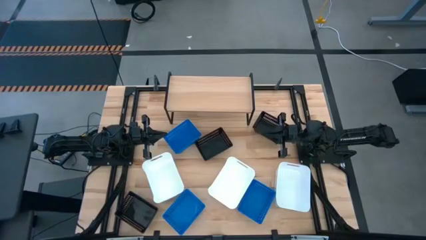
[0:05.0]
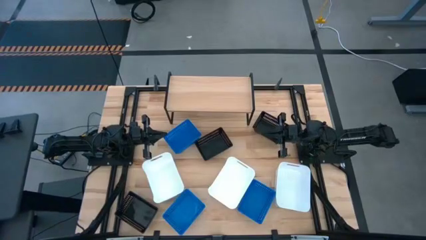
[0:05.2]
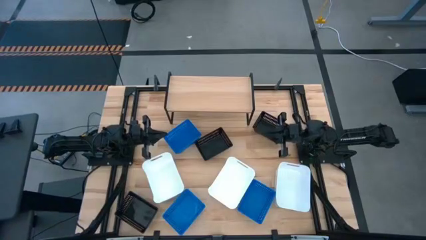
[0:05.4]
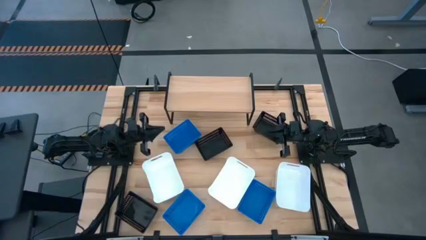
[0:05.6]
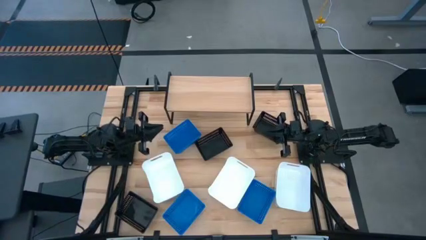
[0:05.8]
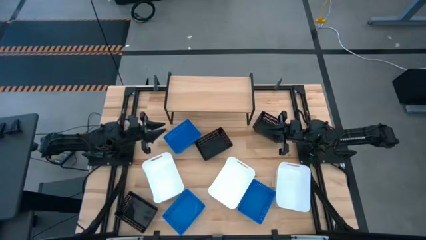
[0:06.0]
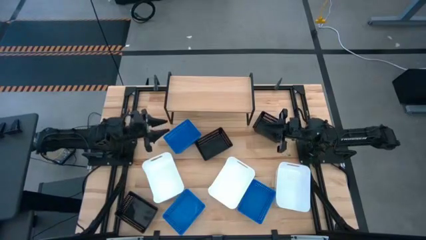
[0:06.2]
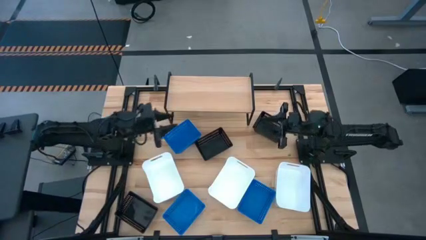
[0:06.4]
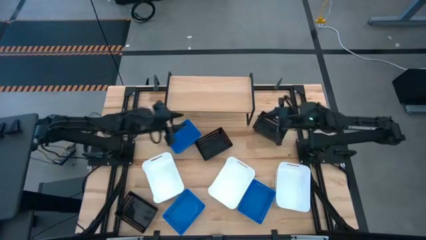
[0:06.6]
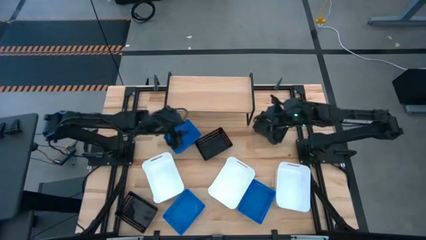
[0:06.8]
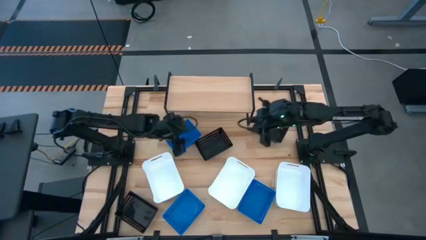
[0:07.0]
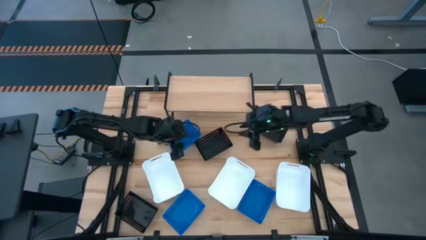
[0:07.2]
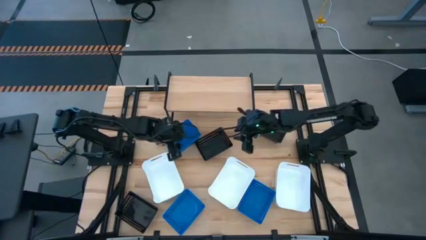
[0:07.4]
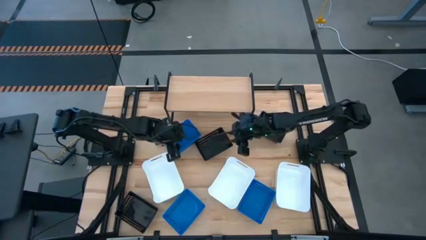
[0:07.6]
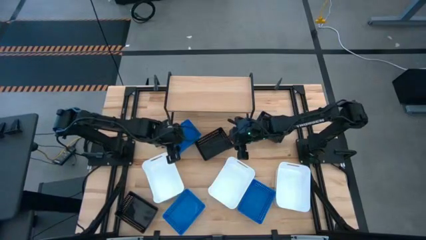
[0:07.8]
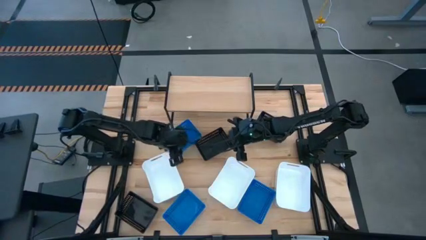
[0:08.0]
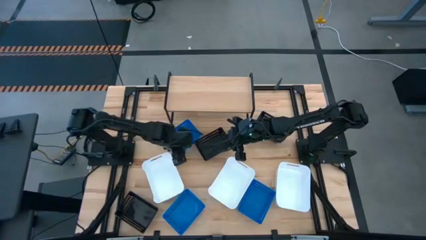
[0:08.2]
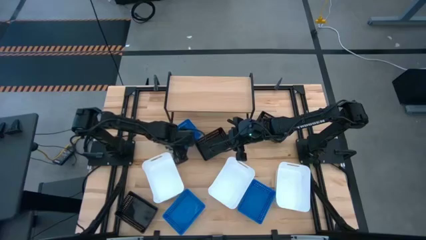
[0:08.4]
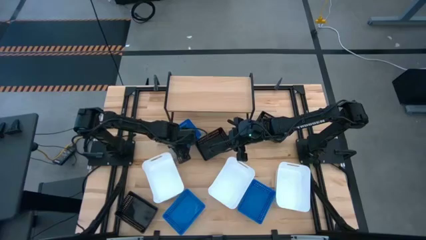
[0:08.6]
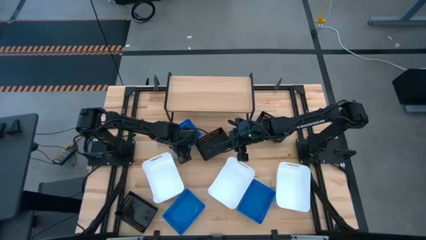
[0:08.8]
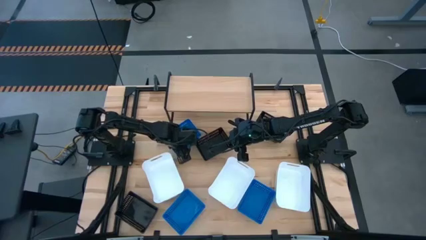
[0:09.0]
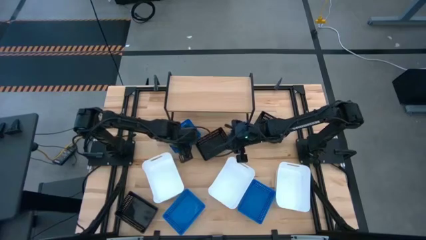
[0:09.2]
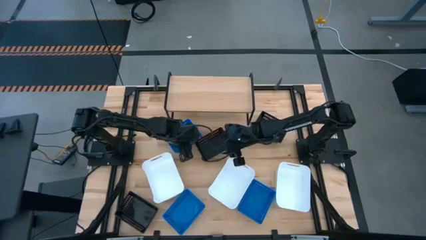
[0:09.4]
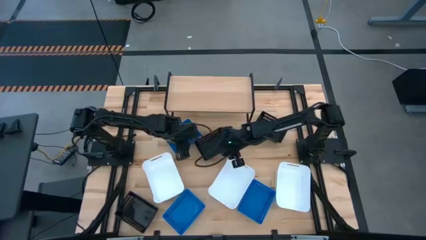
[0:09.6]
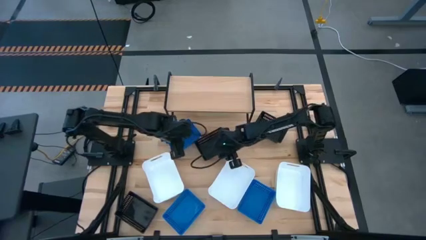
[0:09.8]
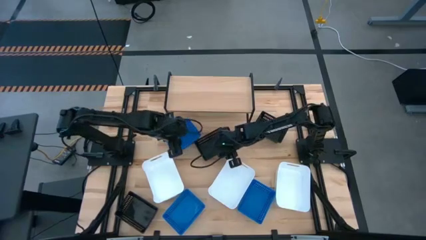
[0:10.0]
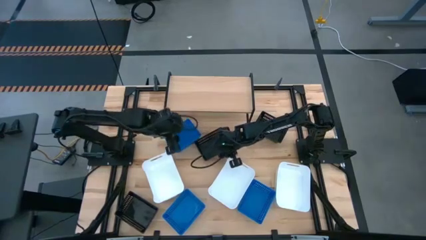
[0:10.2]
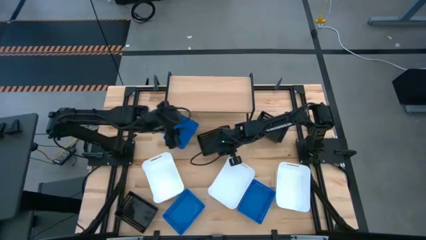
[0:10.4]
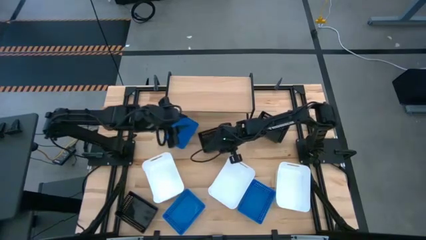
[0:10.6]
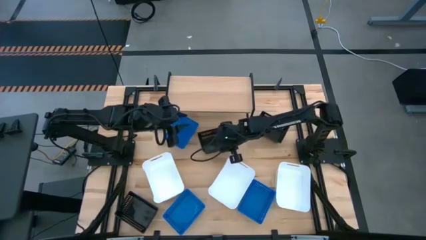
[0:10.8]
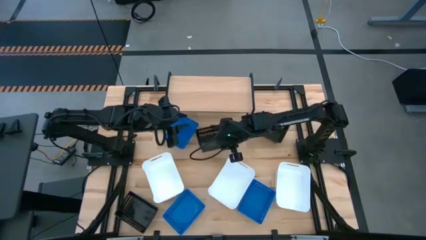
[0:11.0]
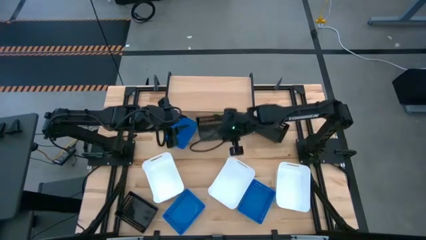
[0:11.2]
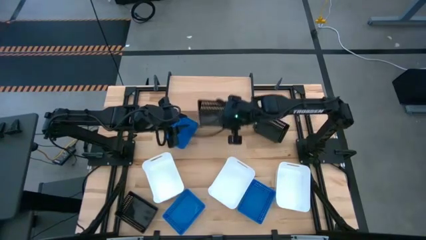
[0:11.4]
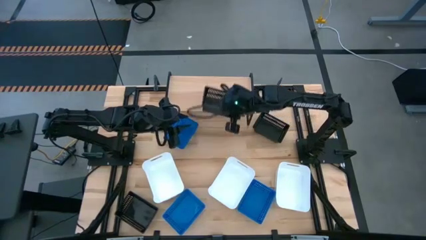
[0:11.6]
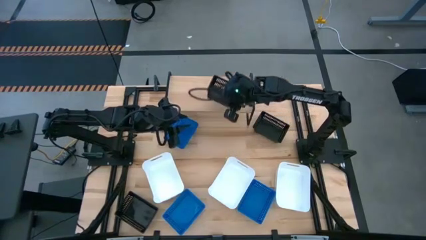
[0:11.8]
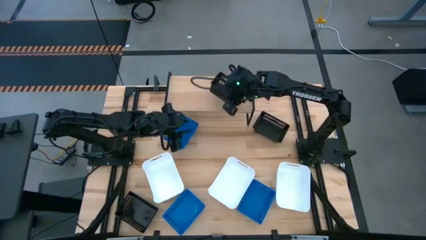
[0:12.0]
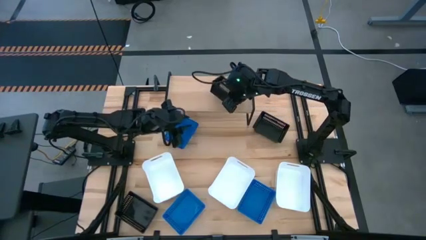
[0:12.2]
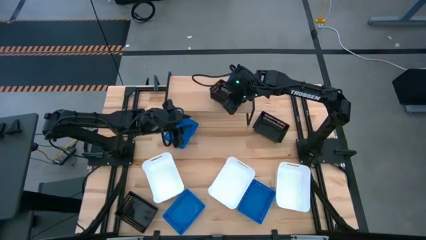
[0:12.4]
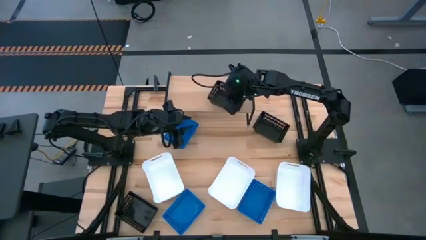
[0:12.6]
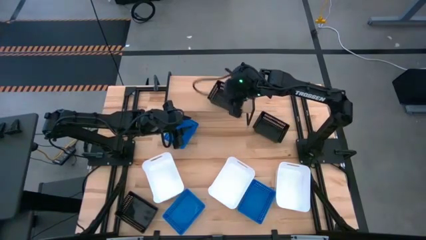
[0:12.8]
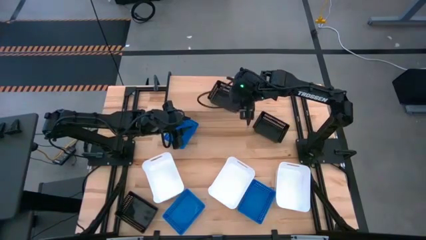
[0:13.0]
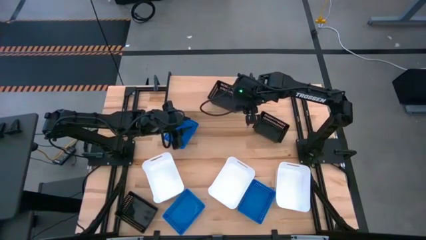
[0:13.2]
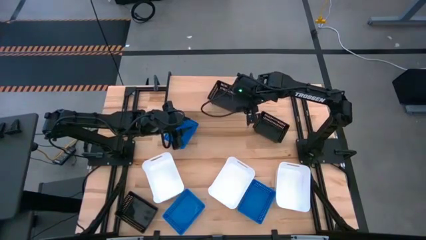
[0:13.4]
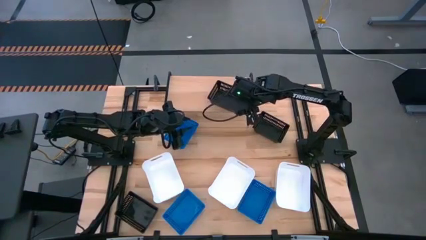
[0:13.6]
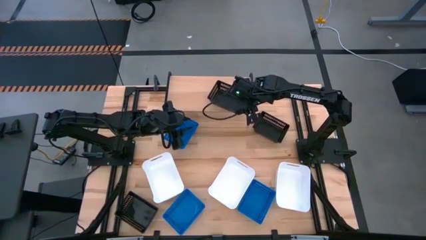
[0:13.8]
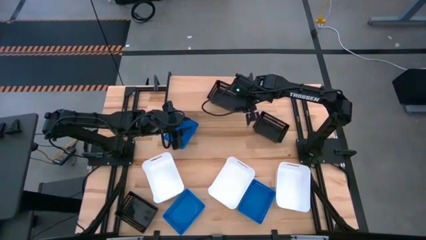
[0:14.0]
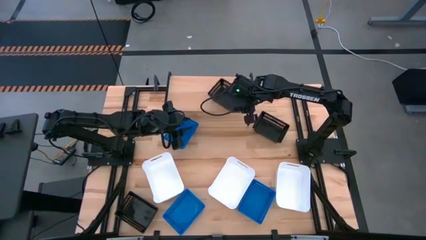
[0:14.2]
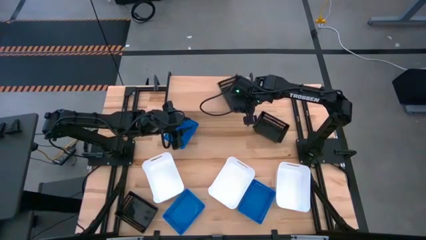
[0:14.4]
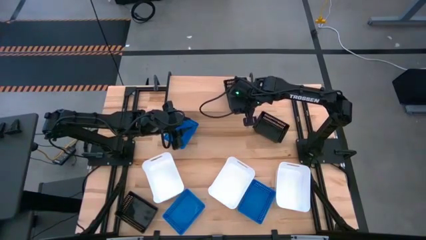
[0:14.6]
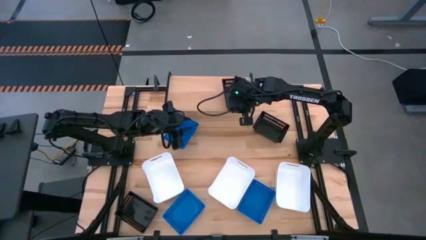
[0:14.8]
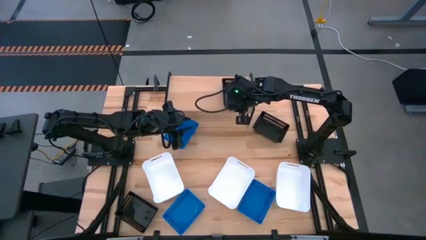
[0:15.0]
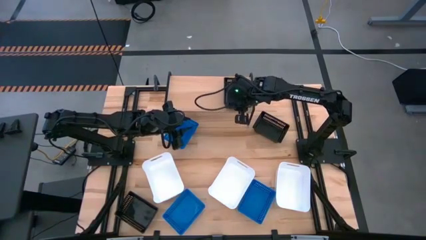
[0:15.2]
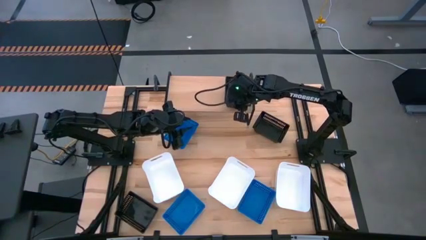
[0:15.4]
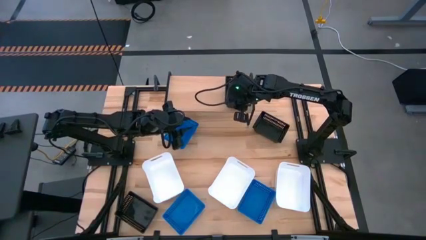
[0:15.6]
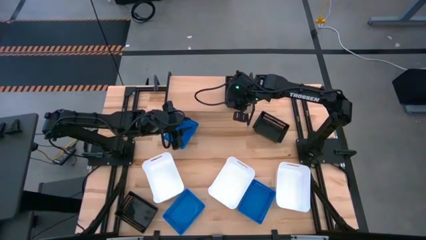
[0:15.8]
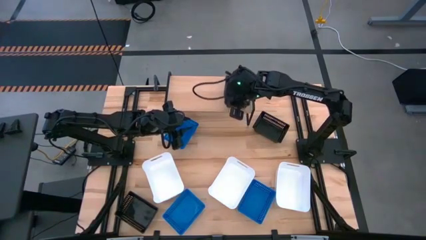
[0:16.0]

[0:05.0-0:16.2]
Task: Stack baskets on shelf by color
Put the top right black bin on the shelf

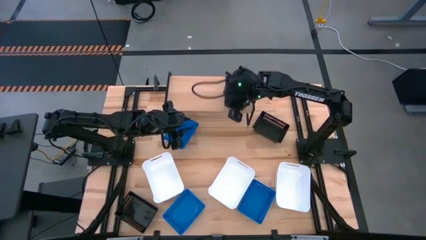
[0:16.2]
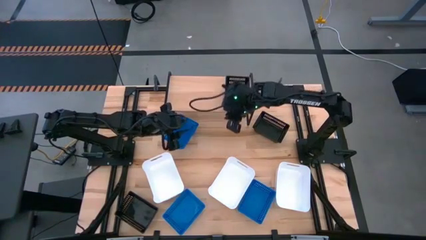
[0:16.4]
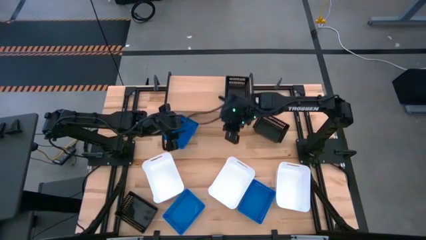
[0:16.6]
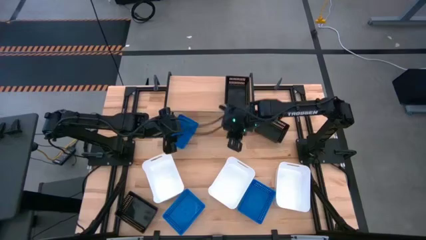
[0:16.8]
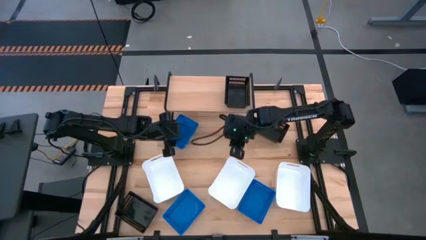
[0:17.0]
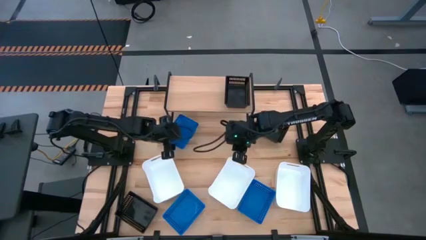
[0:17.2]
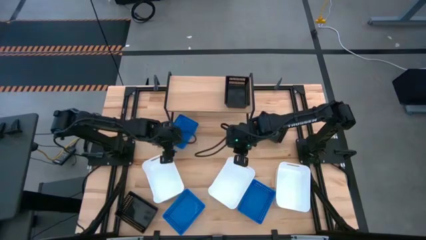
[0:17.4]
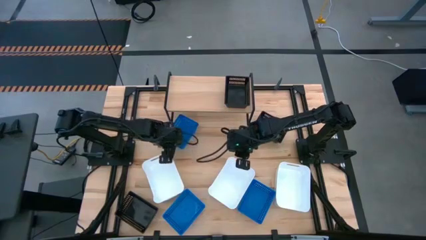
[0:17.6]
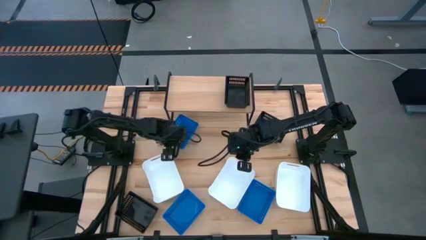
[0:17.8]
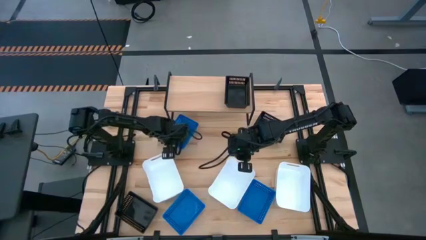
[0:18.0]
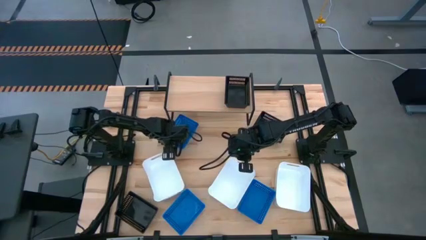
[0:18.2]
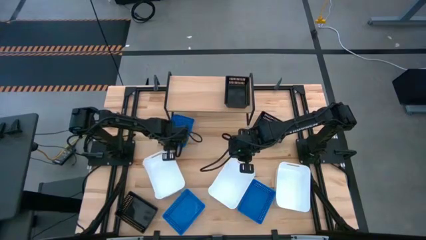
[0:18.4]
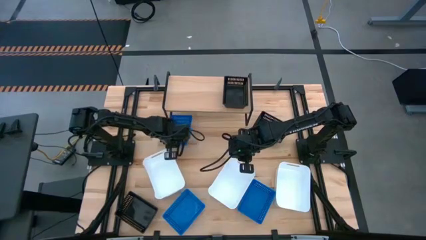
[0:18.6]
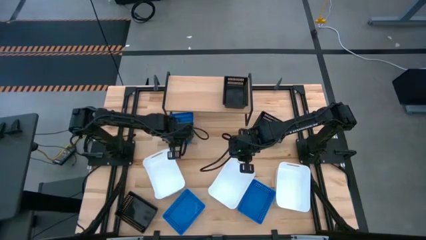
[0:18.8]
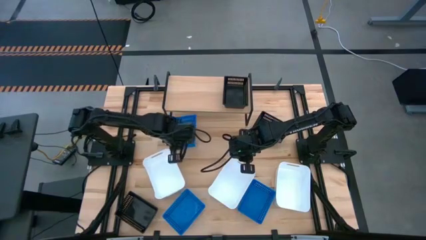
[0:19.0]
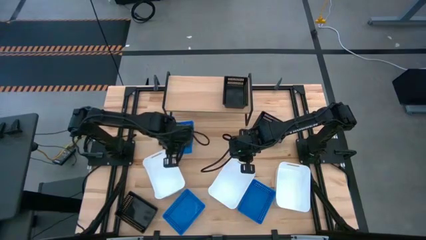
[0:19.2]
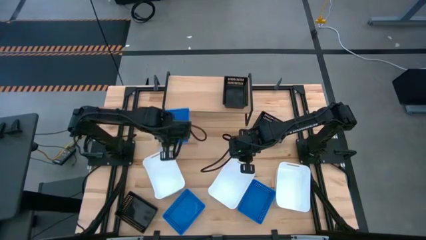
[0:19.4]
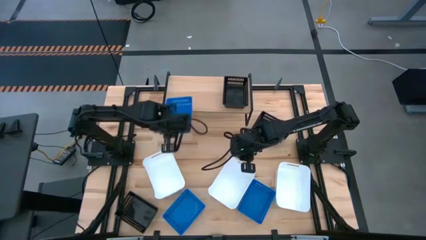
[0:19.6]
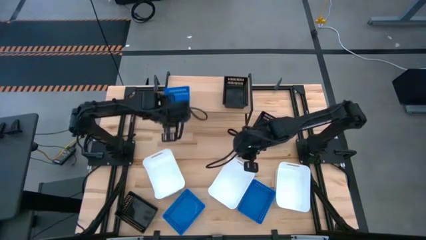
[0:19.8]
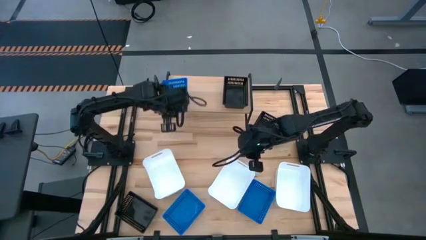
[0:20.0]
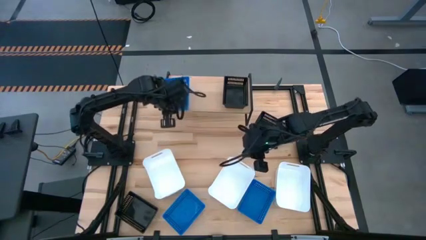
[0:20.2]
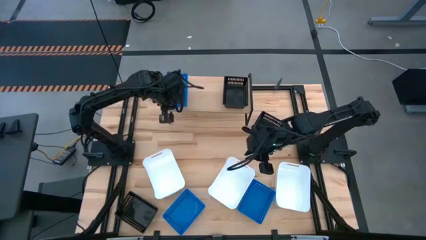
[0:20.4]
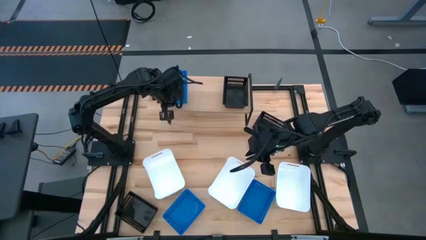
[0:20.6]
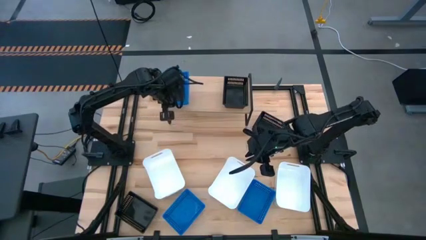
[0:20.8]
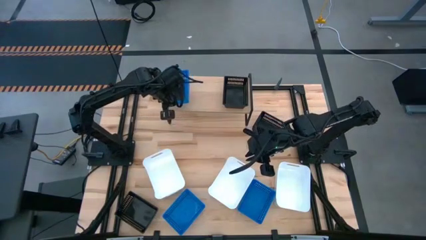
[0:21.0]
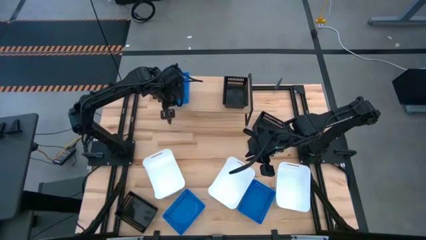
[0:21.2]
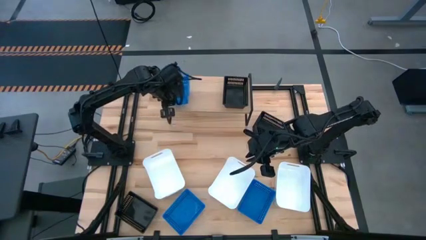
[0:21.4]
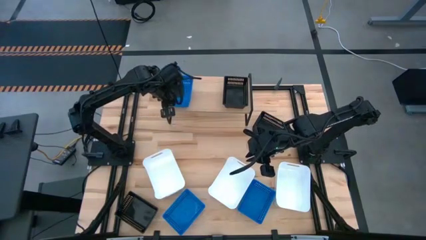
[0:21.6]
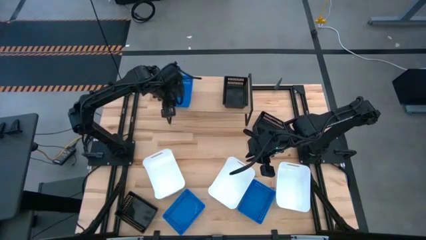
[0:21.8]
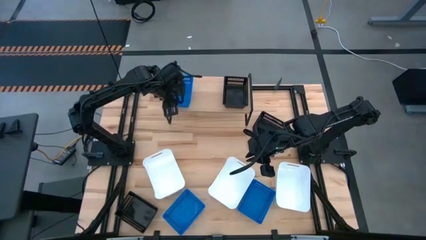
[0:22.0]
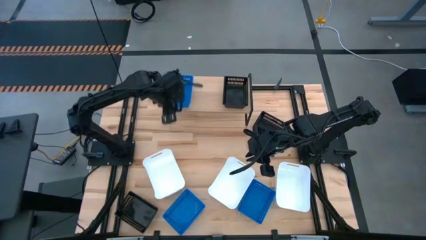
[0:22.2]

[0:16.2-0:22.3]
Put the top left blue bin on the shelf
